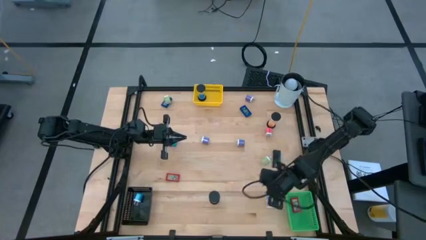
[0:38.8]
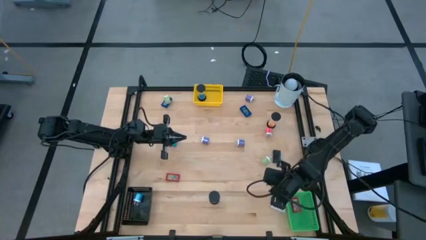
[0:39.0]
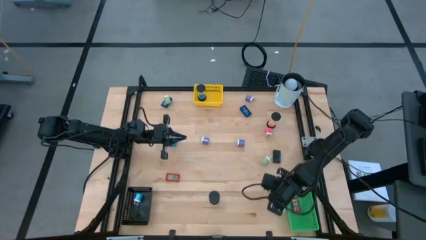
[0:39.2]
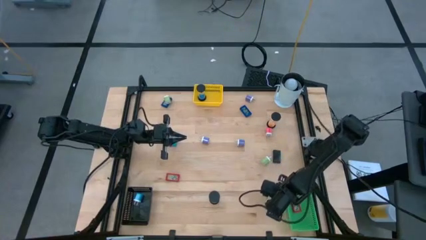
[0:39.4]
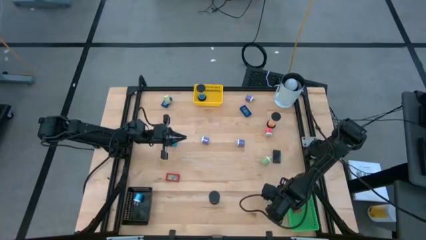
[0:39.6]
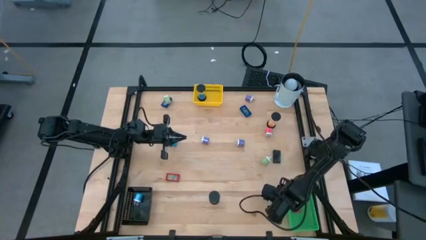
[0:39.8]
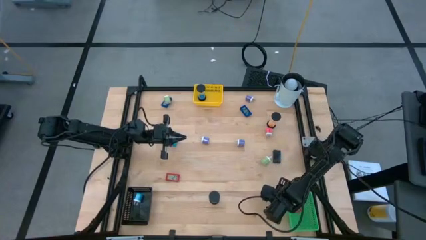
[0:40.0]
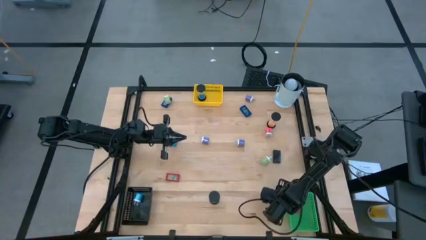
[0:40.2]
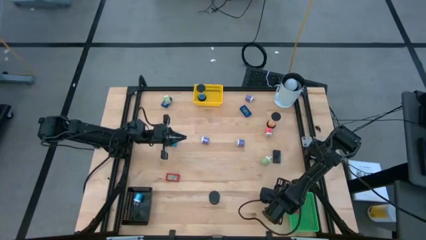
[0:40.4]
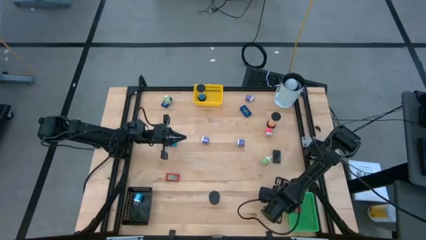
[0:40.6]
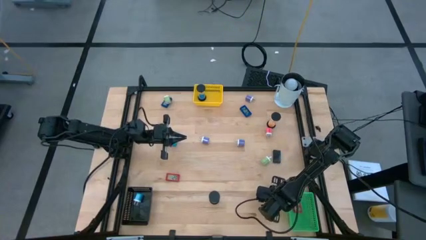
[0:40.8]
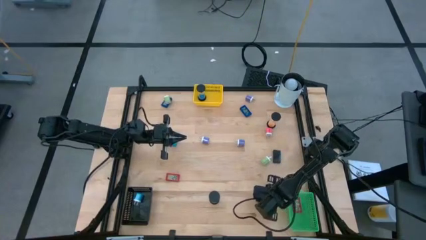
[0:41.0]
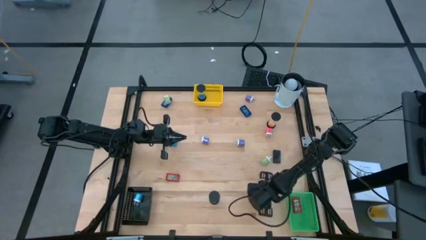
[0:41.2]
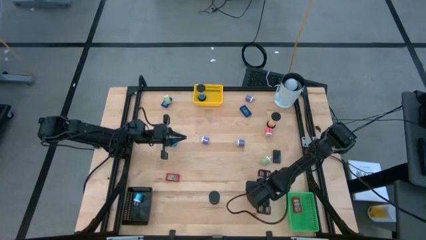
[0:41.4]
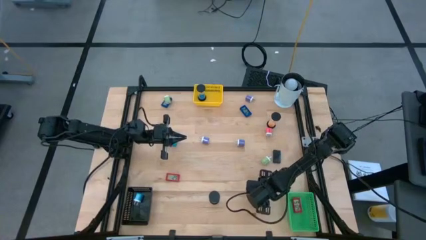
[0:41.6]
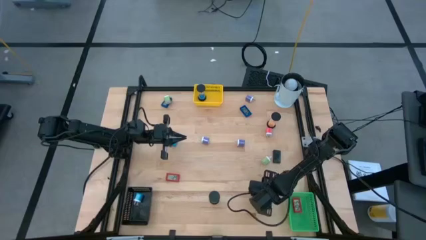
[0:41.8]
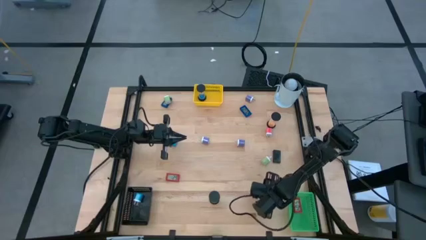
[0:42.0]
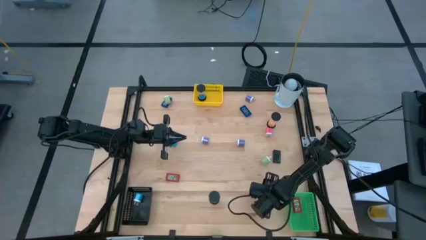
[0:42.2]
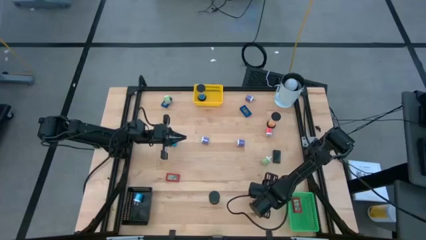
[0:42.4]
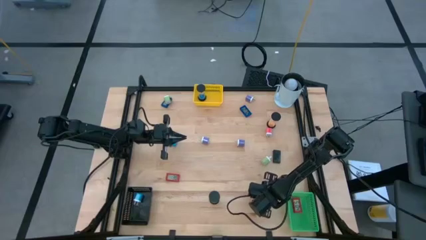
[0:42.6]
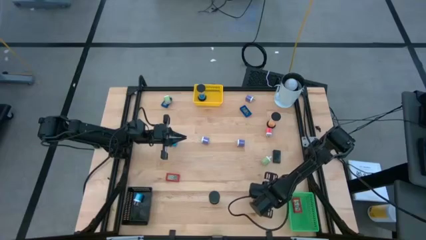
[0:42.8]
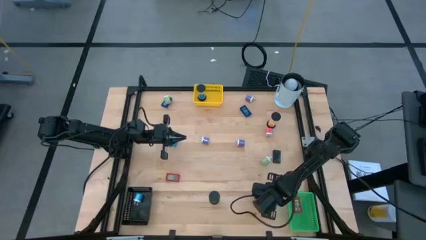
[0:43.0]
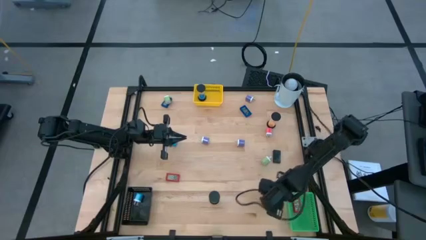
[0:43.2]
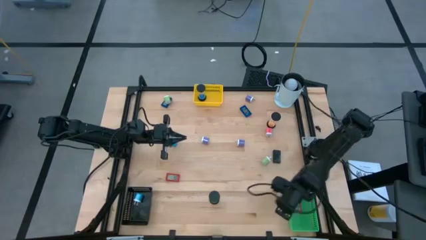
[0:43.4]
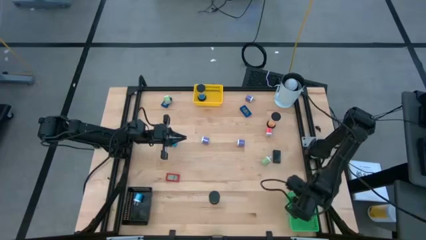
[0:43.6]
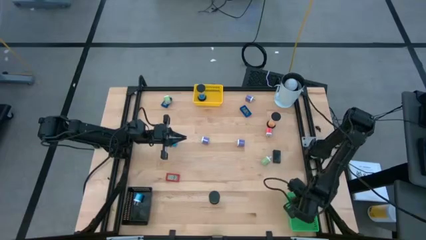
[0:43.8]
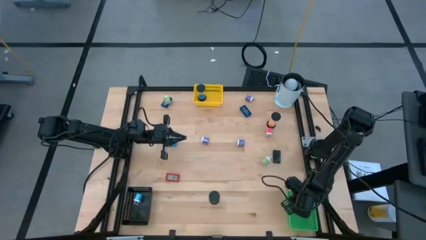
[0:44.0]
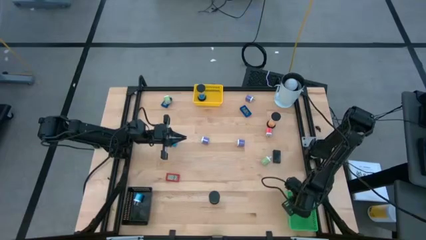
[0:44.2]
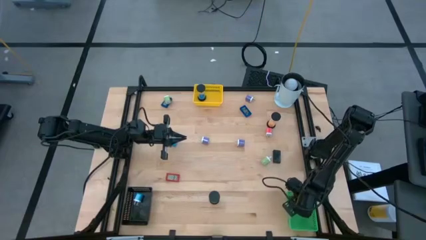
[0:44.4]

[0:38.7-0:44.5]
Task: Pick & Place Office items
Put the white digital timer into the green bin

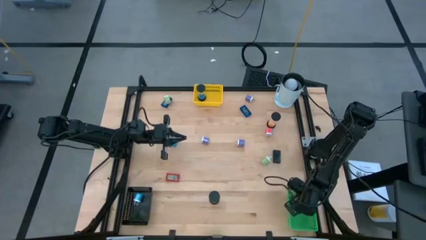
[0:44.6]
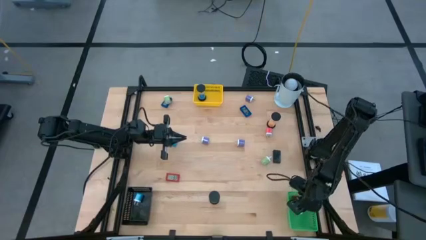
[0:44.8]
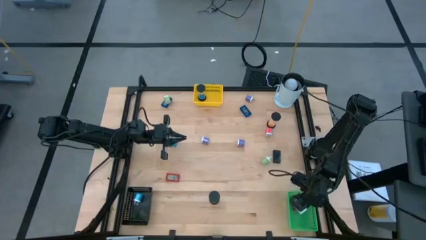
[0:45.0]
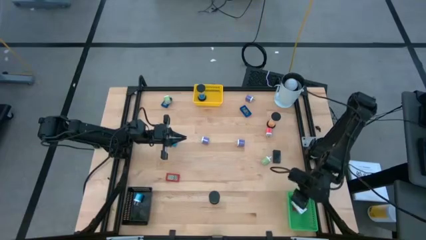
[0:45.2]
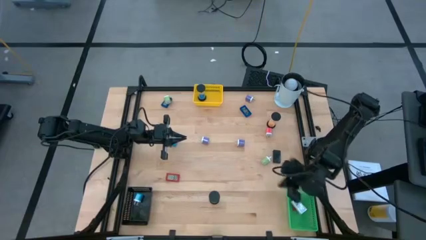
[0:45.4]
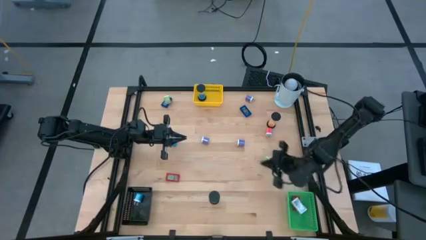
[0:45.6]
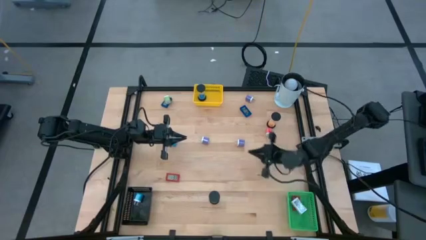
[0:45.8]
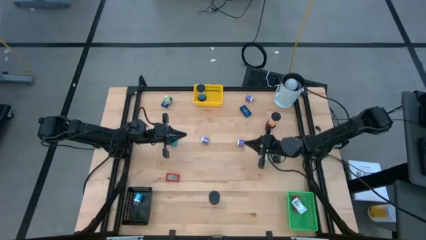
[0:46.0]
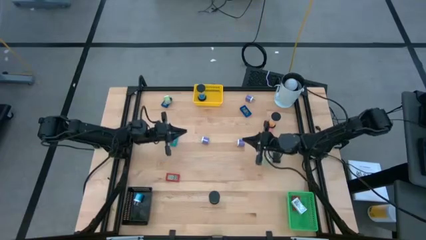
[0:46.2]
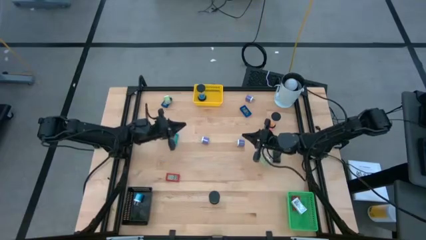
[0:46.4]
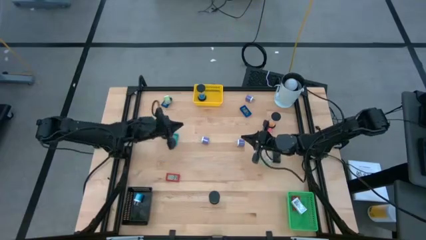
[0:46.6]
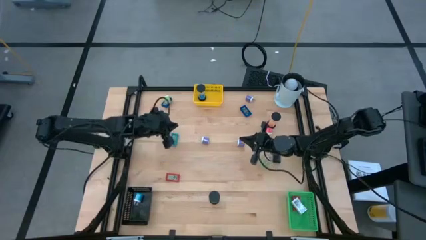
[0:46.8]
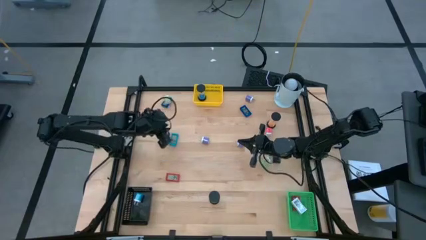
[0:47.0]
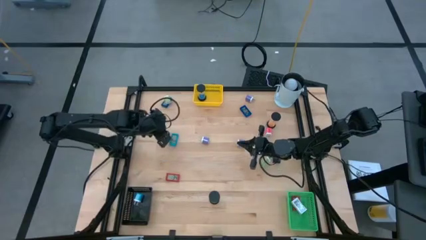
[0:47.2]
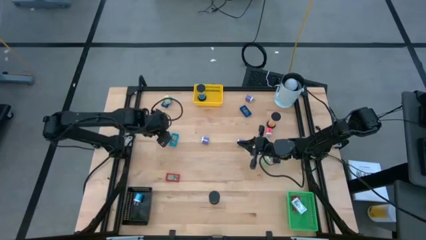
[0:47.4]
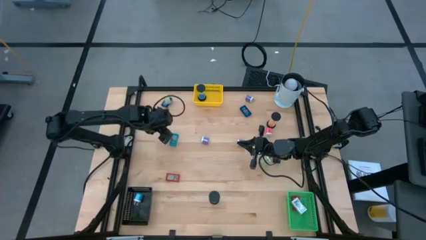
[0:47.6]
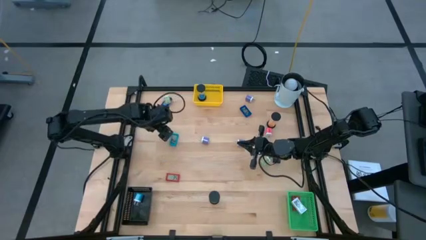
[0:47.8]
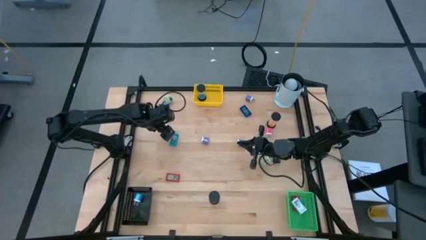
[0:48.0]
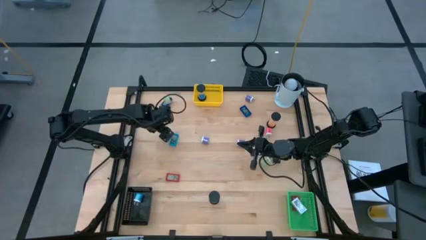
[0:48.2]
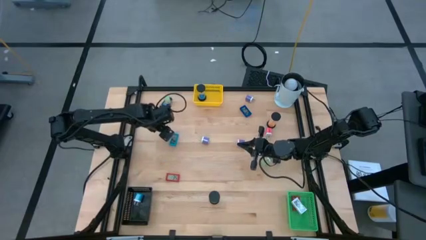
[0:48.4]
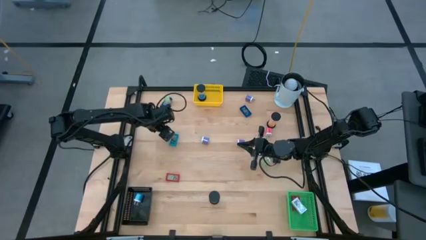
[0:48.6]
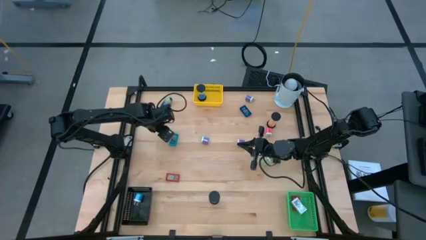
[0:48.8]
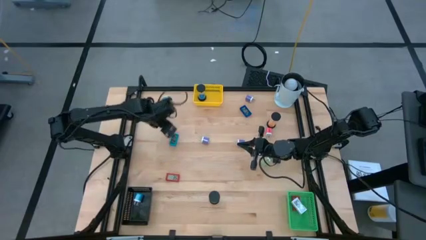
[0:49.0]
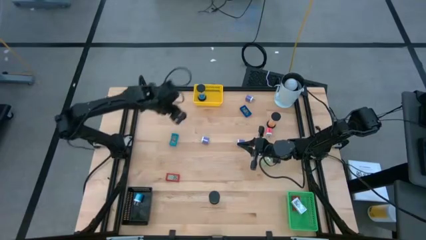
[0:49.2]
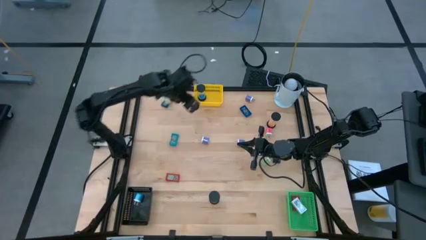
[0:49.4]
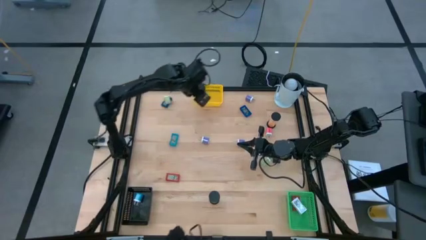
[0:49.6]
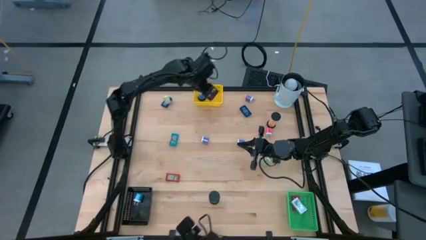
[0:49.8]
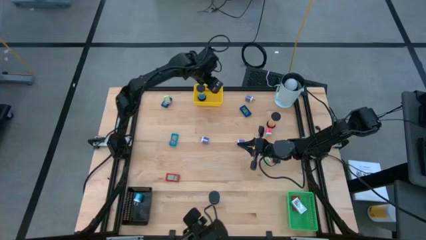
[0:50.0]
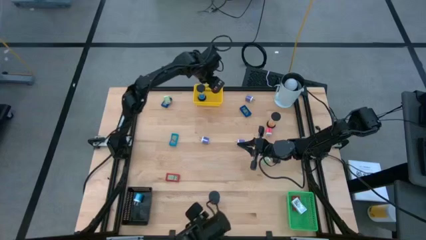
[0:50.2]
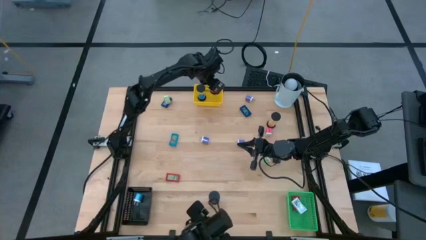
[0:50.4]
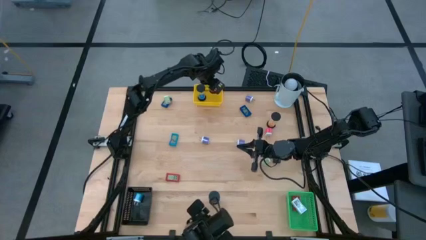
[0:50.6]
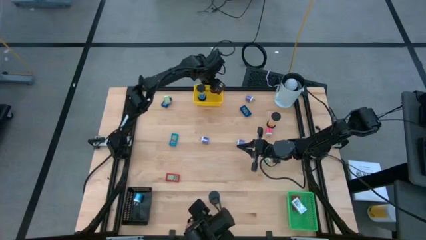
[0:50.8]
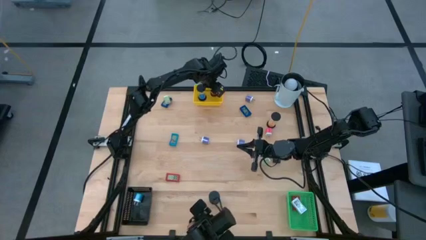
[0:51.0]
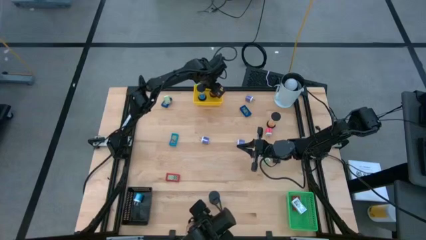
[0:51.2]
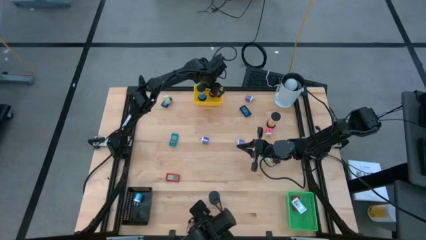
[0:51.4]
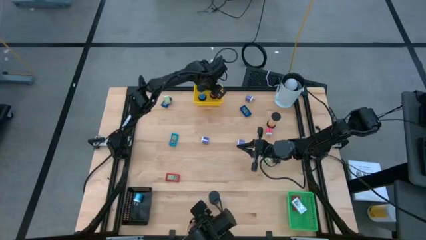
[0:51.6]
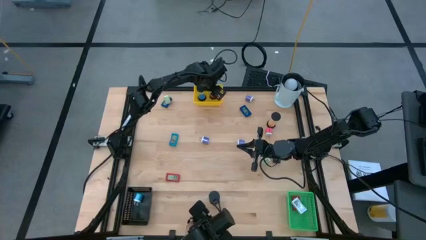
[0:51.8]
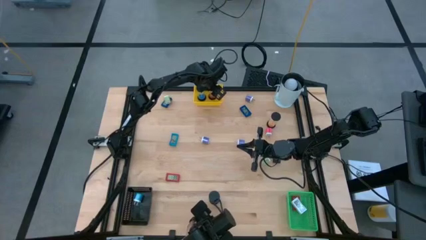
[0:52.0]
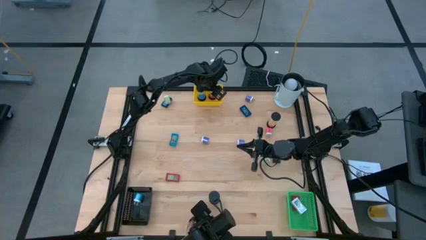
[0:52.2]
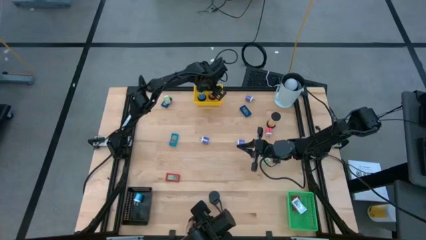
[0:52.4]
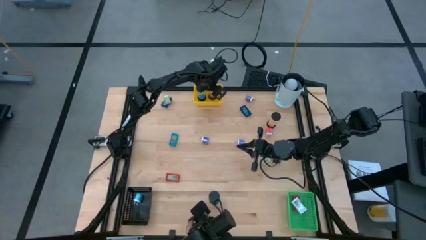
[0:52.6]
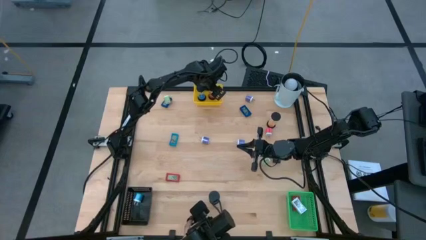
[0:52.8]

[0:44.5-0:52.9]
Put the red hour glass into the yellow bin
